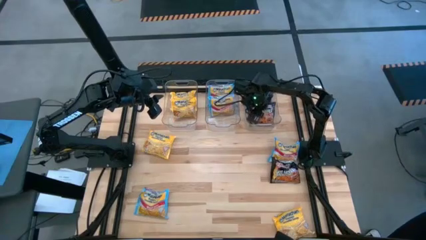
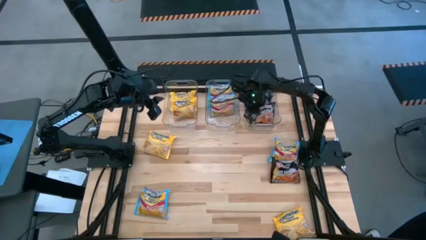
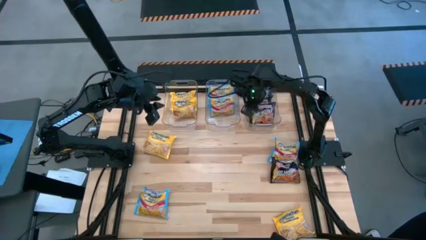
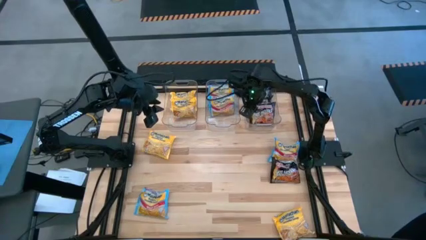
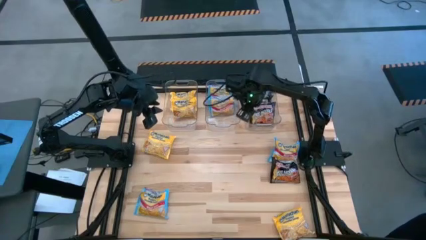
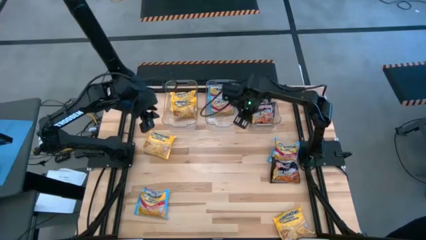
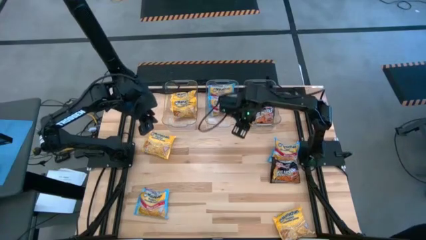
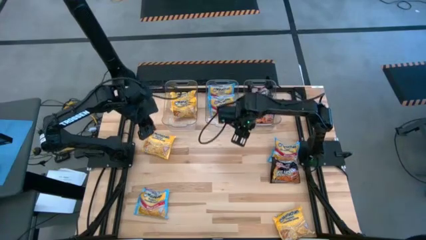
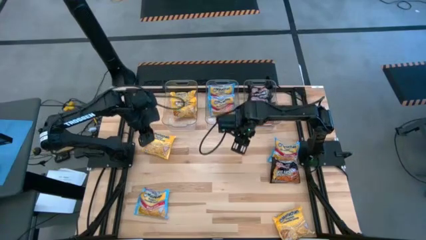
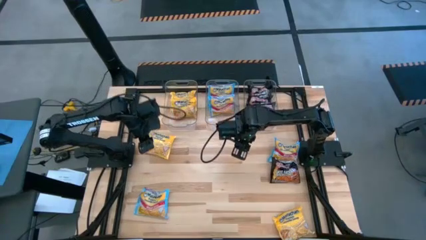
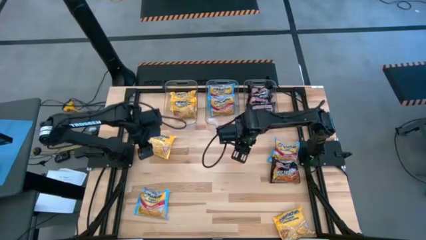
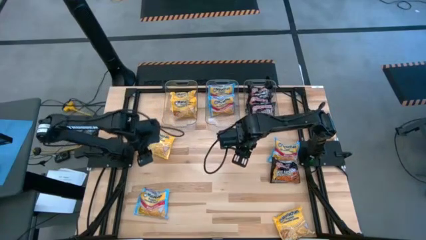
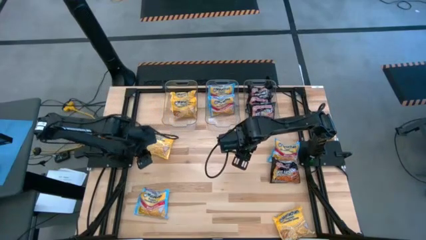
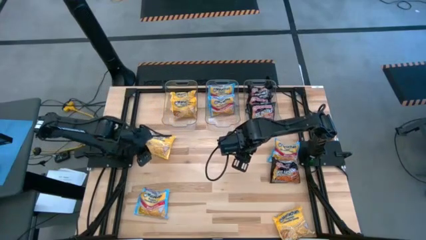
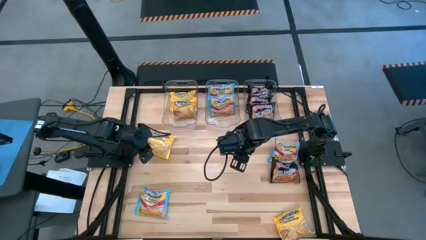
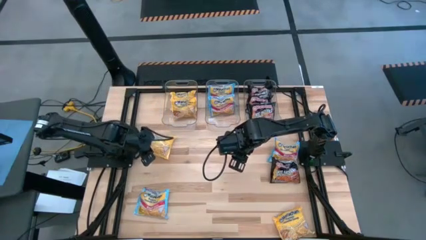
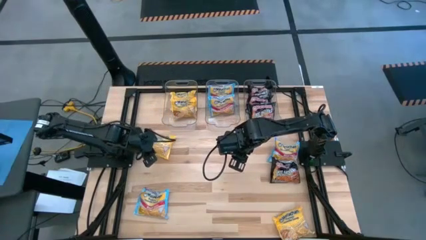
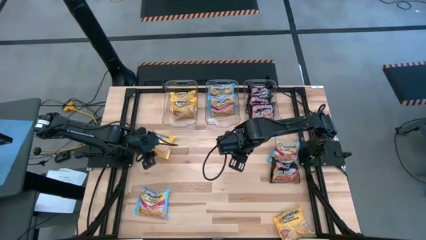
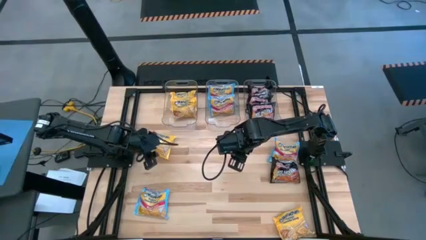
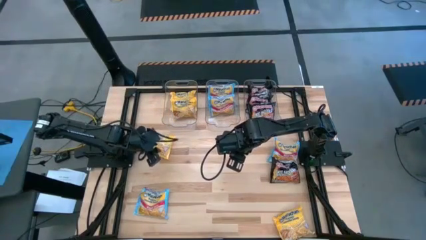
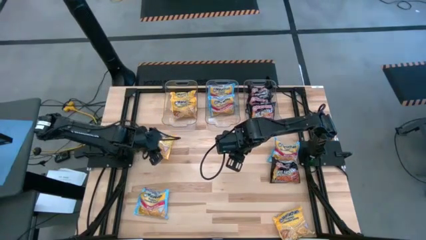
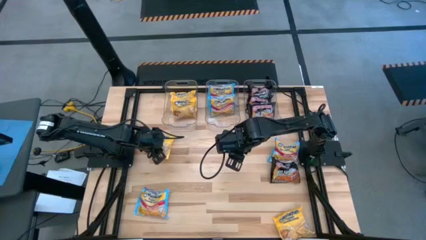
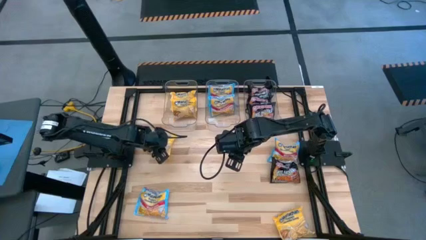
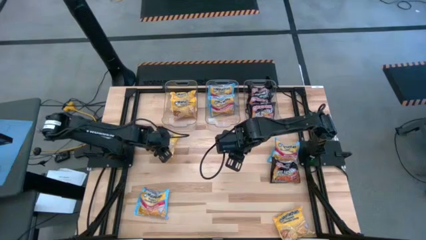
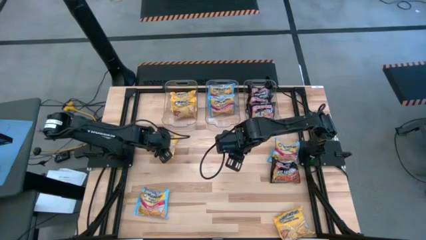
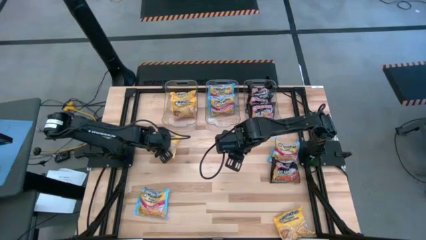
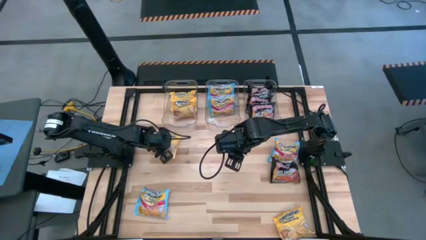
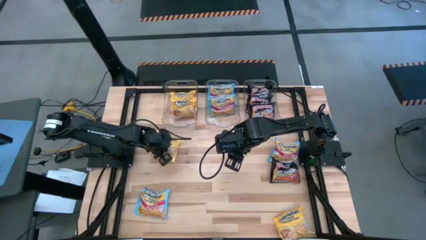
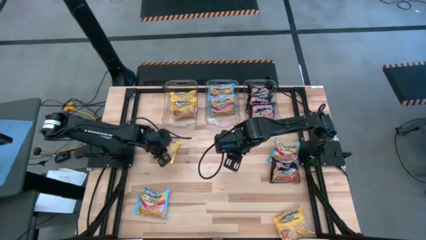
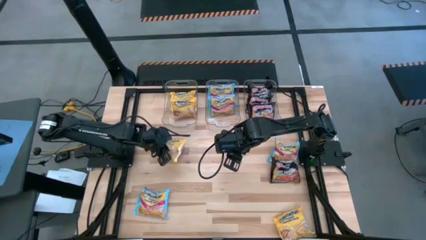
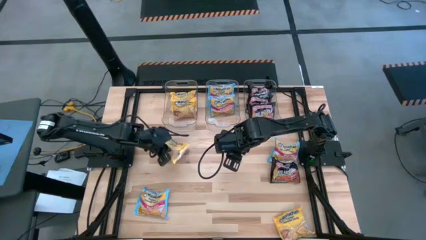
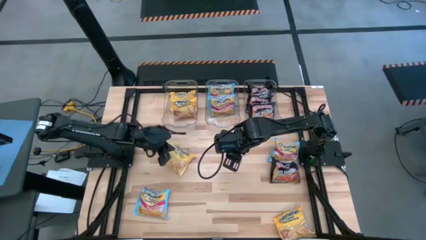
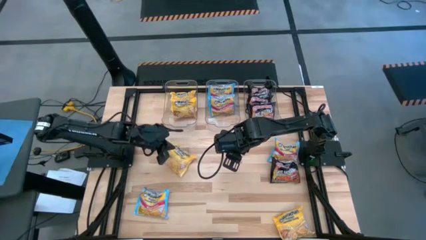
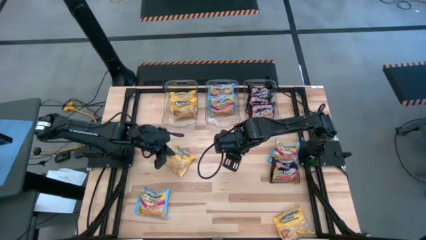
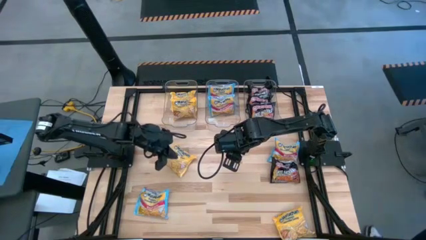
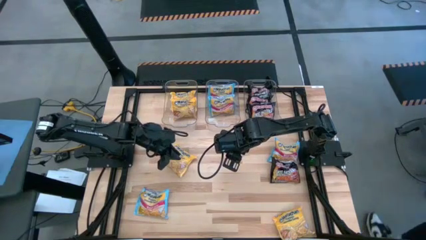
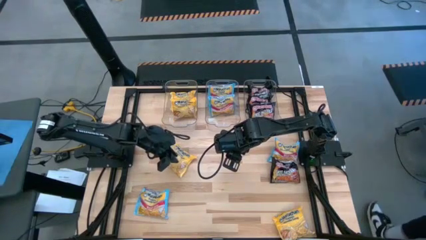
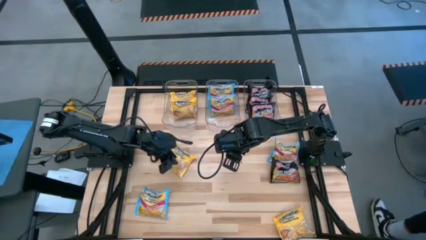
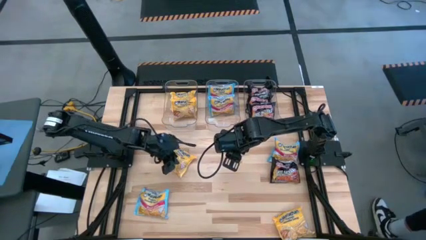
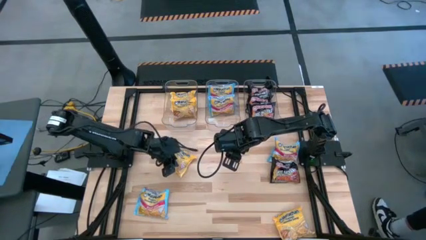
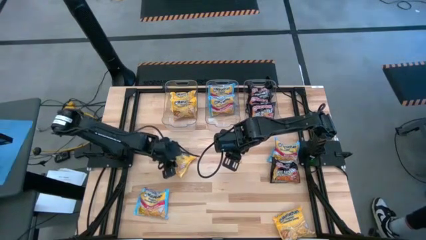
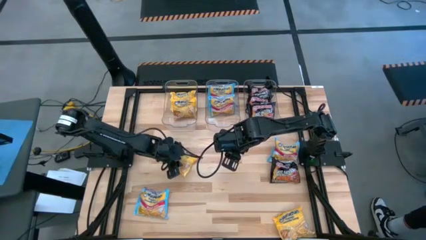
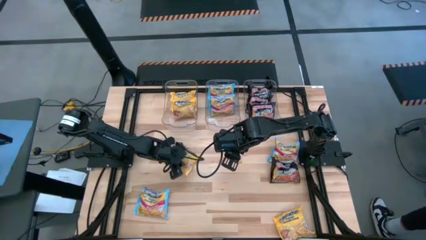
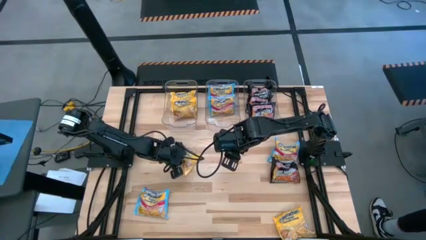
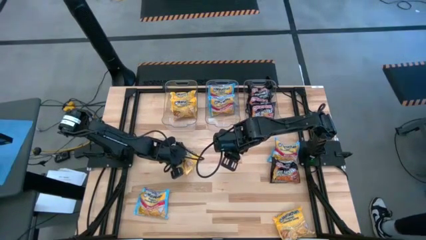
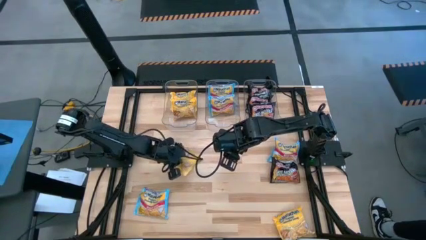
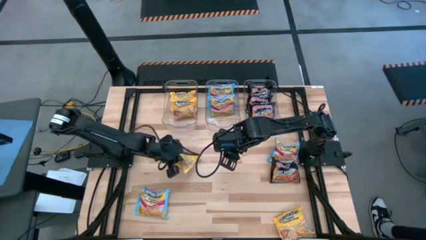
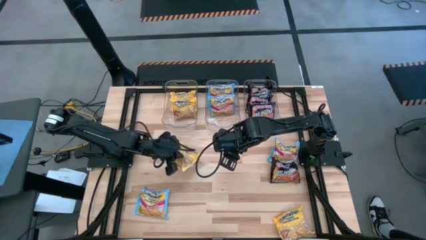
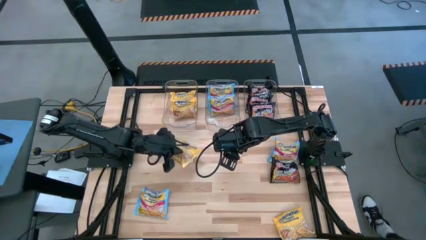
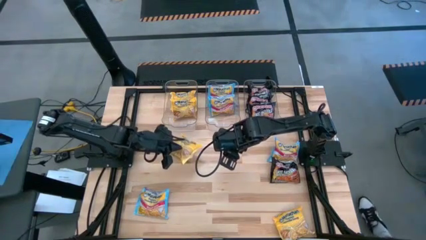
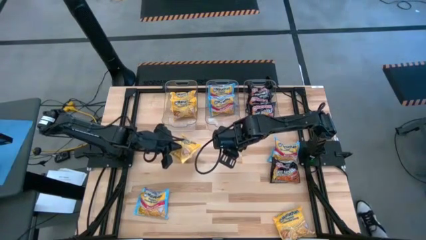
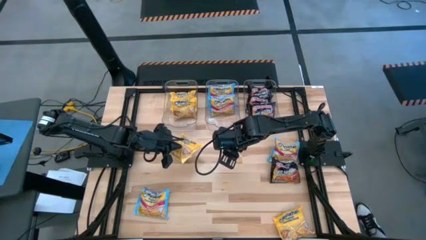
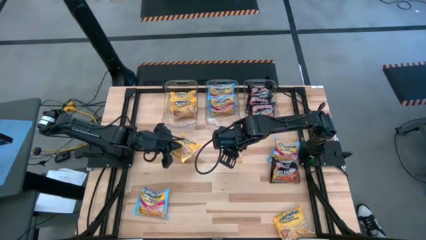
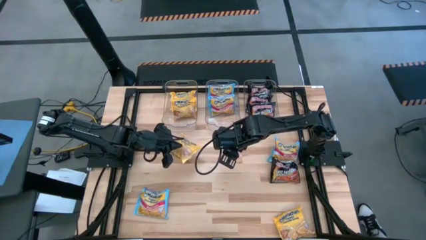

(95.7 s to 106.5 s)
Task: Sort Maruchan noodles
Put the yellow noodle pack into the left transparent bin

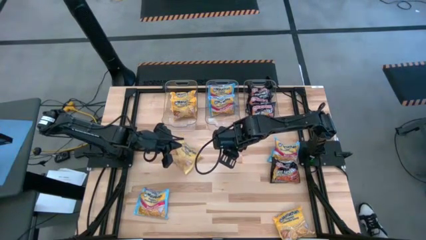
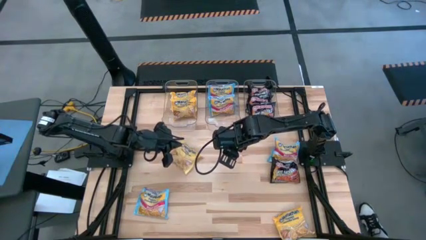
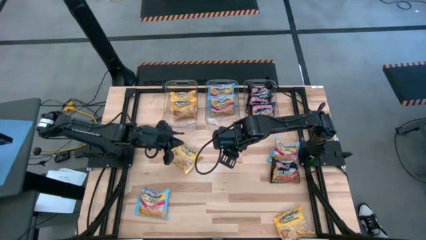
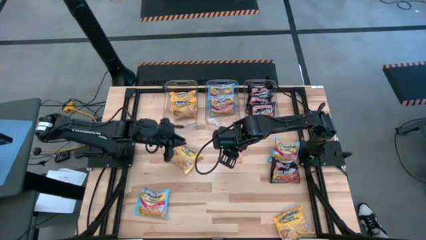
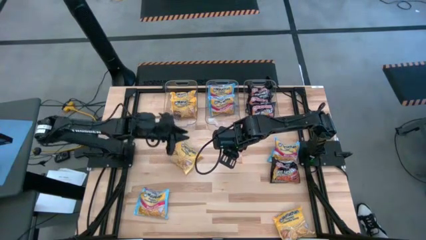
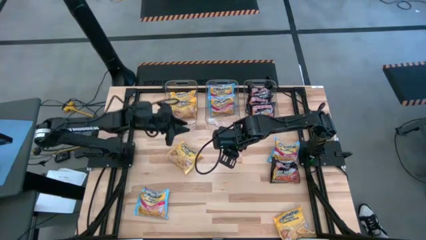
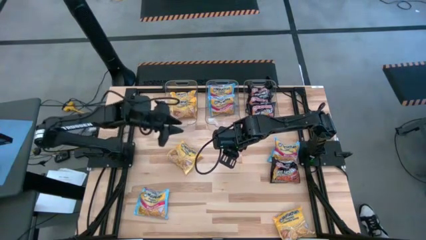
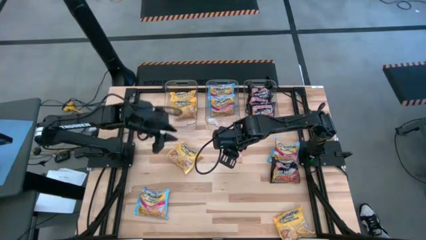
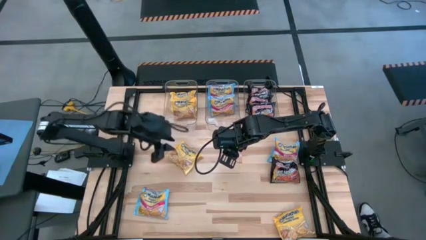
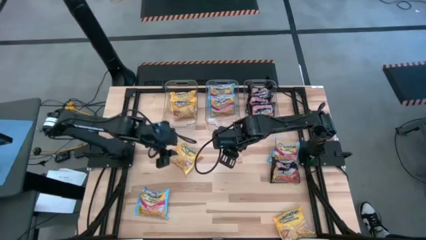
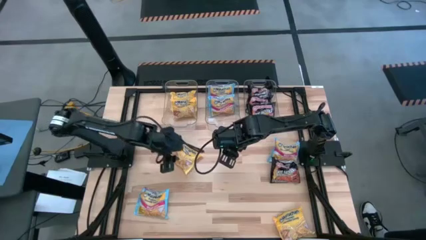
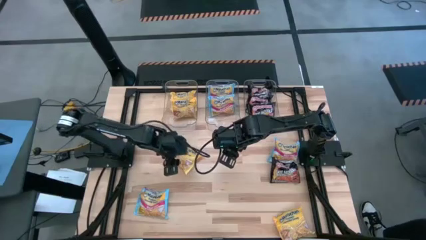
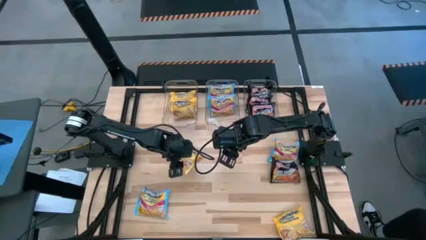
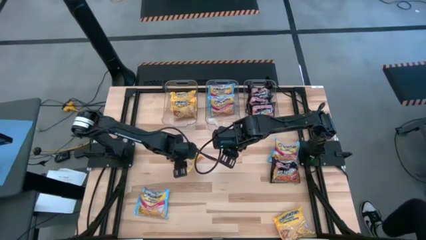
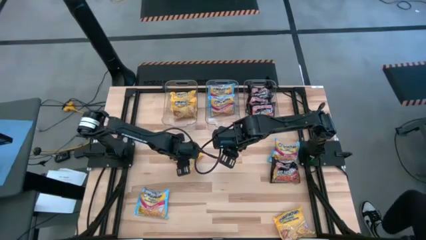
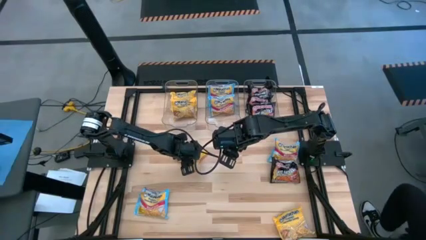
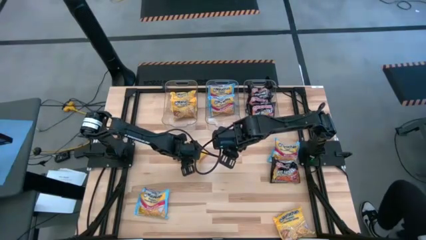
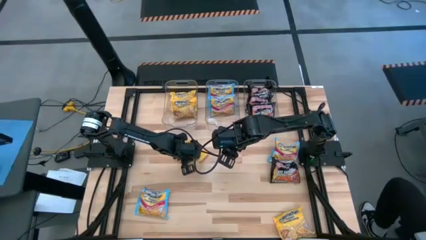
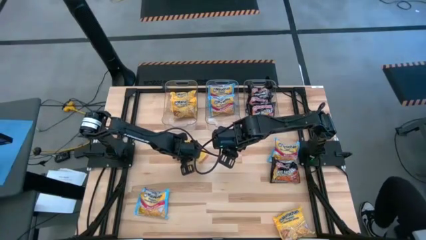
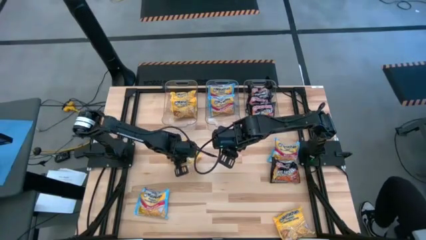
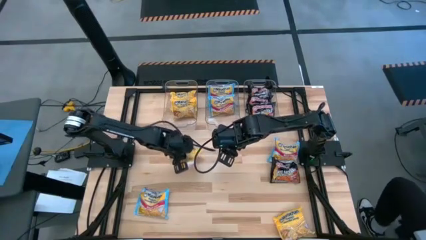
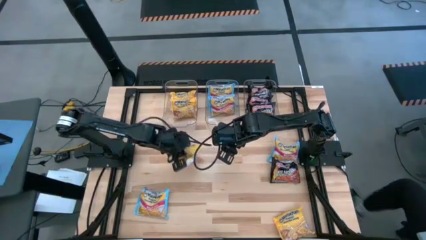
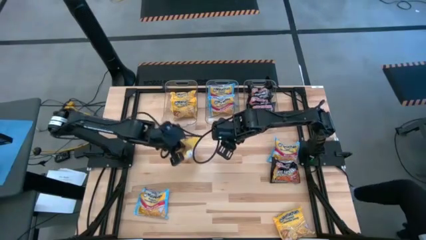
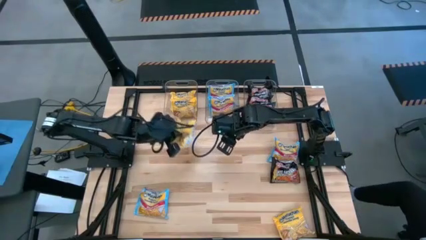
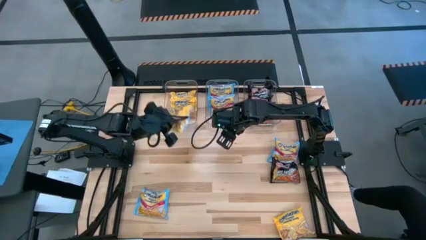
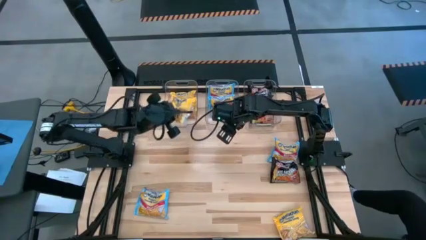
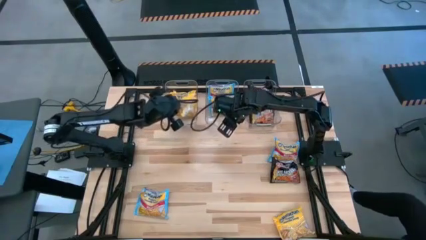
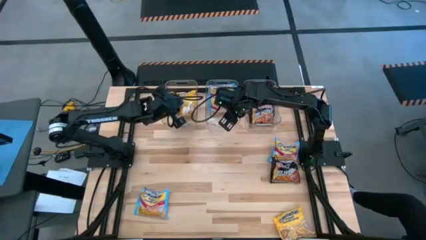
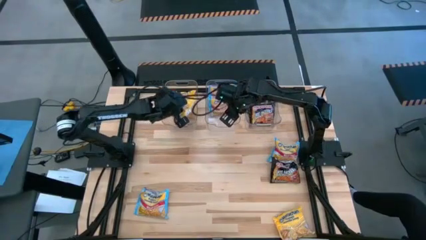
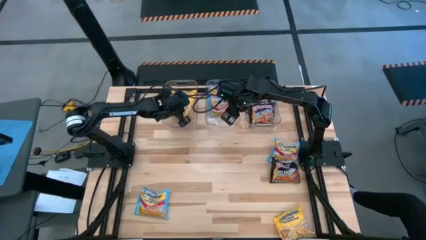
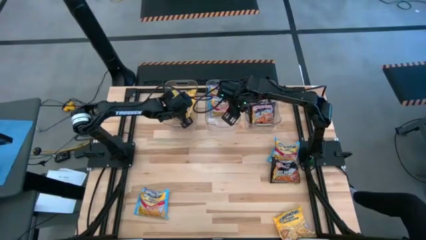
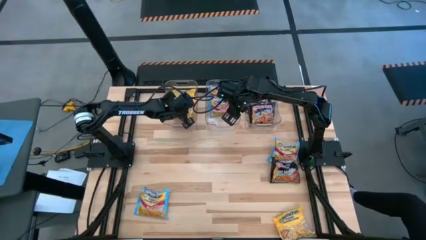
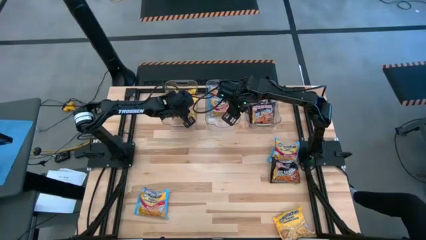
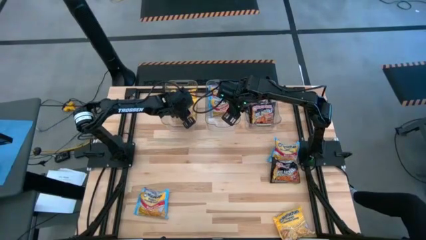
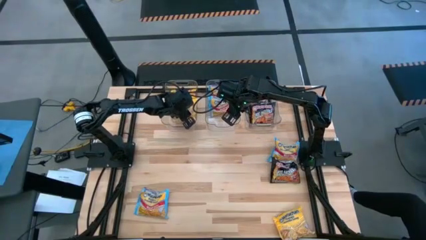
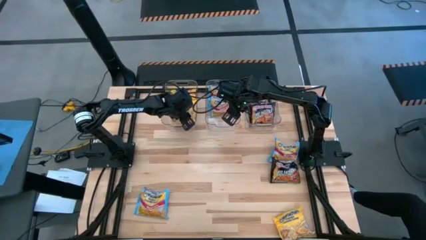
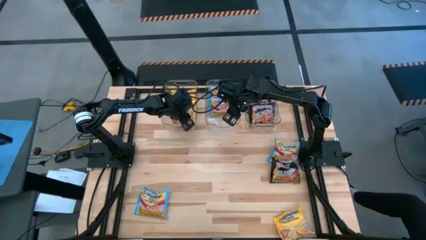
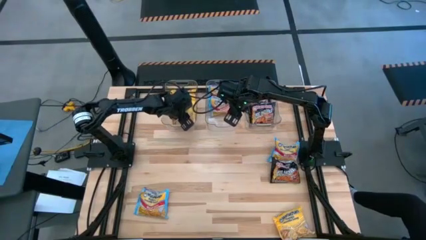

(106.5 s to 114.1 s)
Put the yellow noodle pack into the left transparent bin
